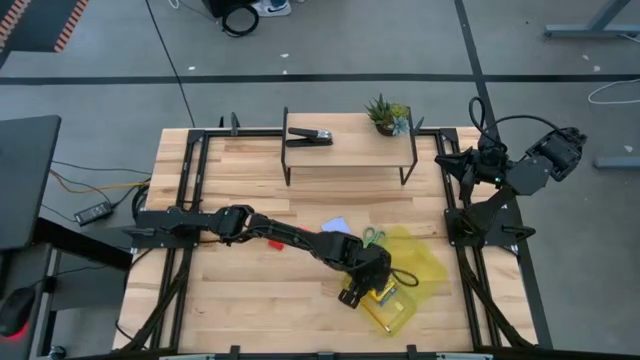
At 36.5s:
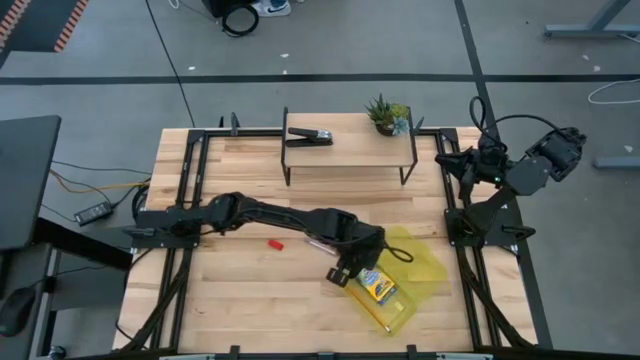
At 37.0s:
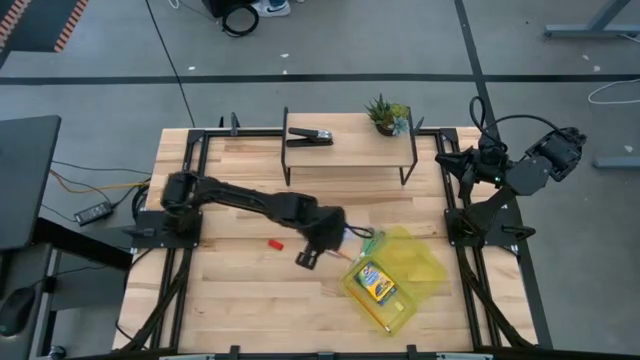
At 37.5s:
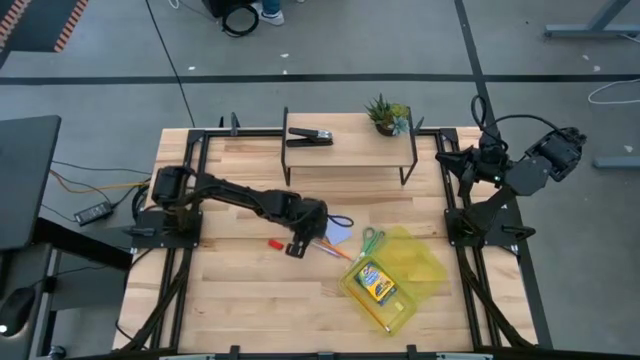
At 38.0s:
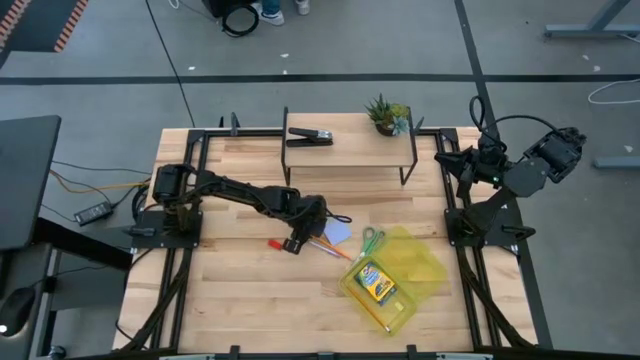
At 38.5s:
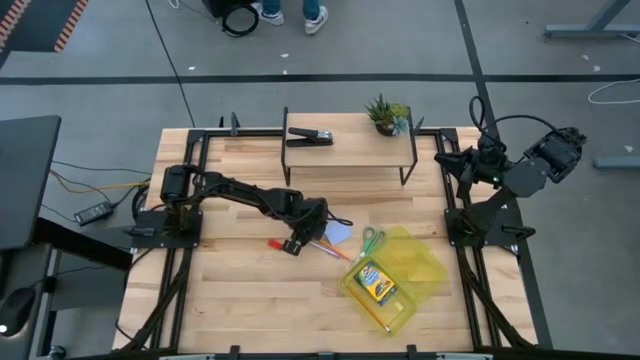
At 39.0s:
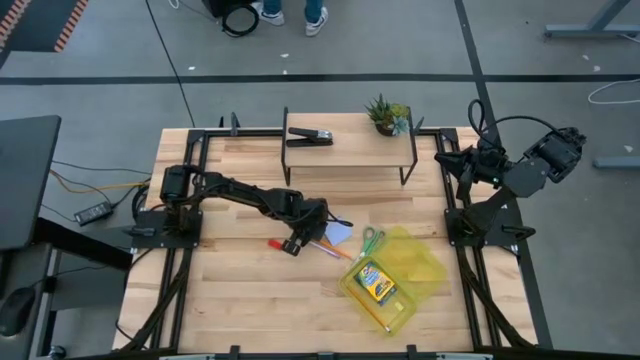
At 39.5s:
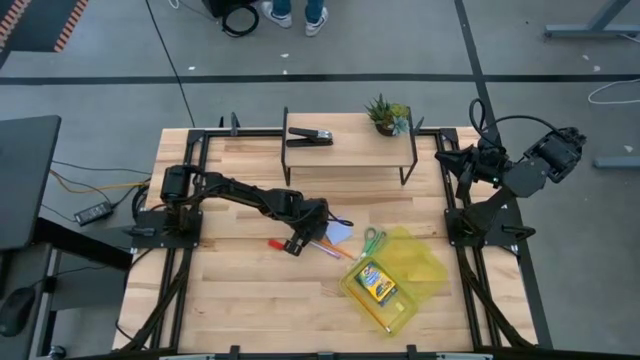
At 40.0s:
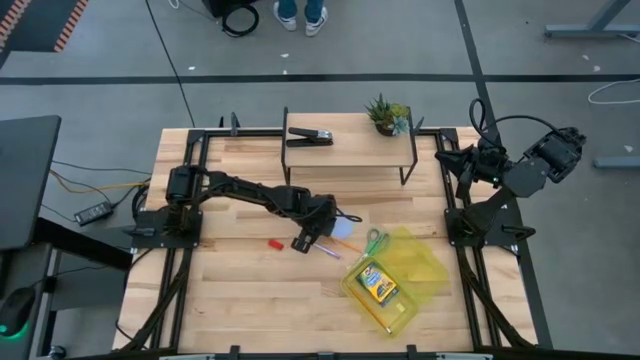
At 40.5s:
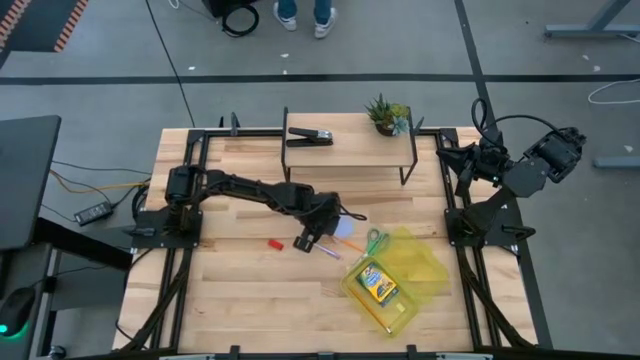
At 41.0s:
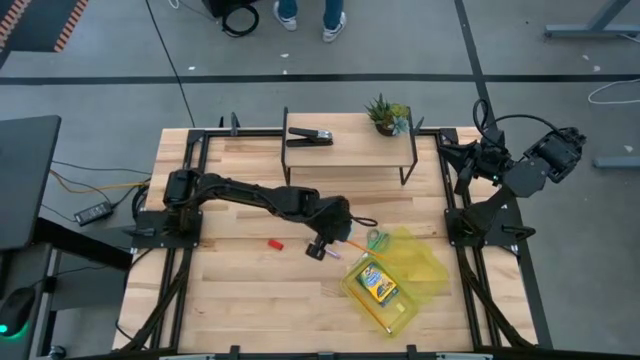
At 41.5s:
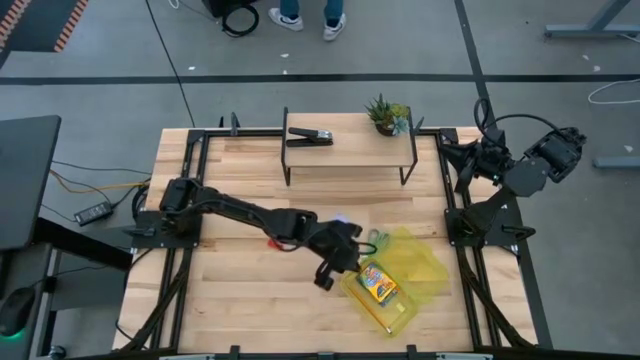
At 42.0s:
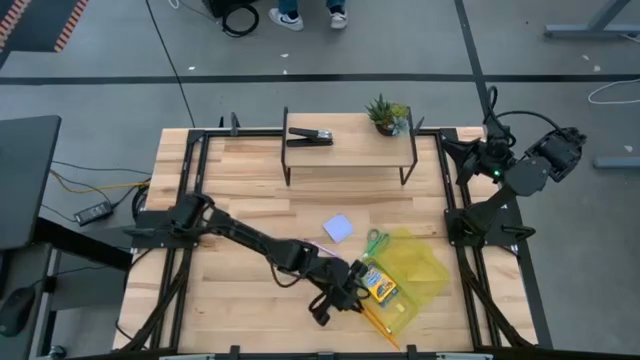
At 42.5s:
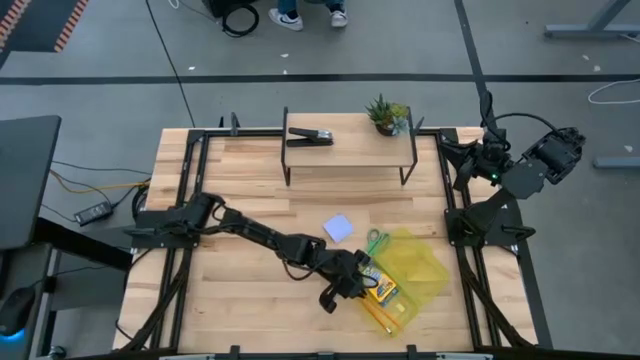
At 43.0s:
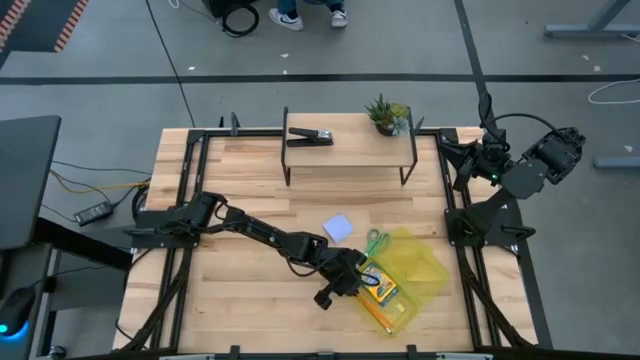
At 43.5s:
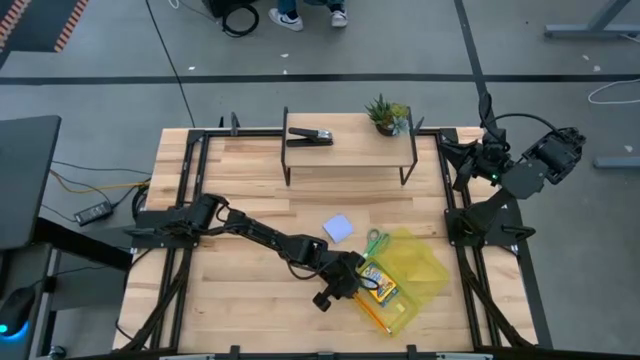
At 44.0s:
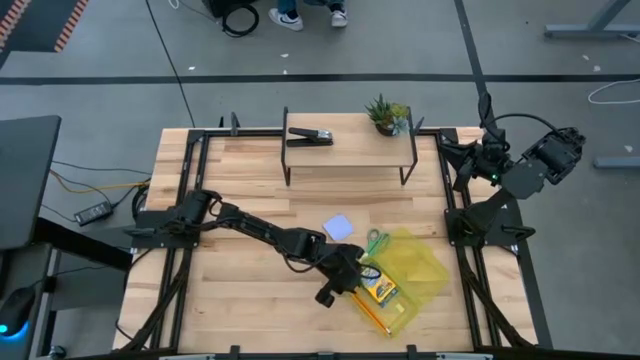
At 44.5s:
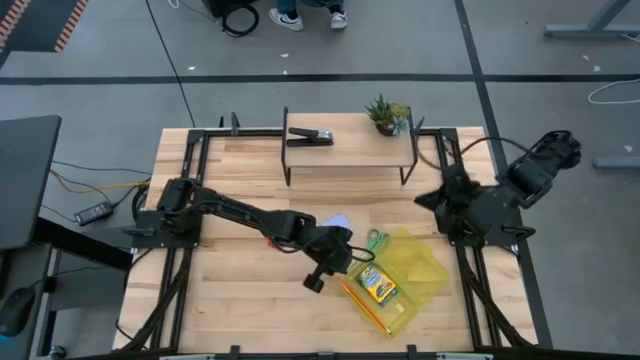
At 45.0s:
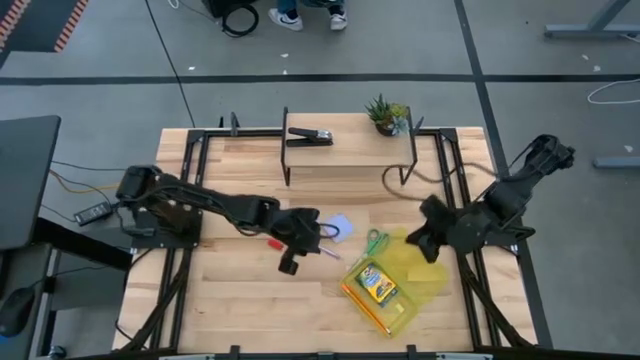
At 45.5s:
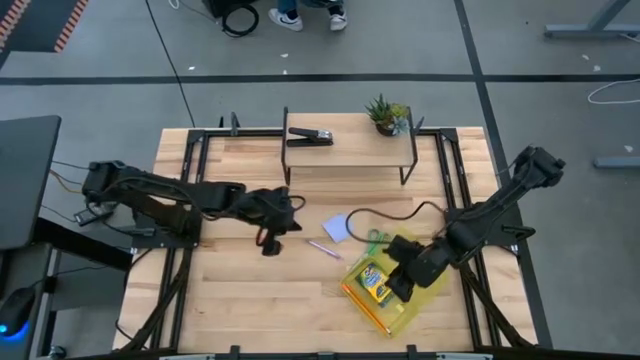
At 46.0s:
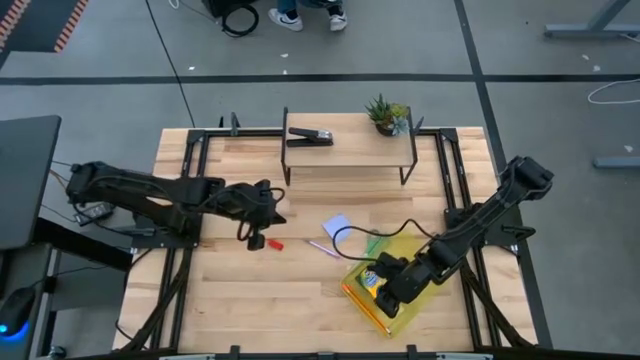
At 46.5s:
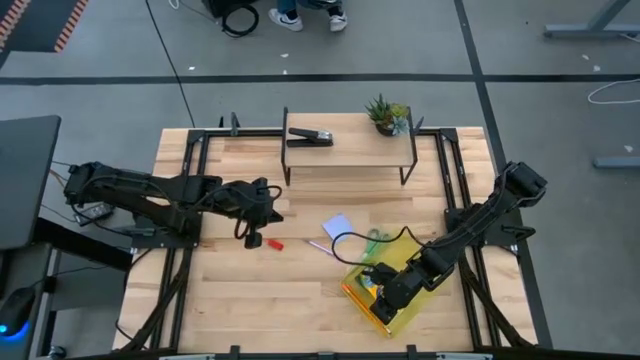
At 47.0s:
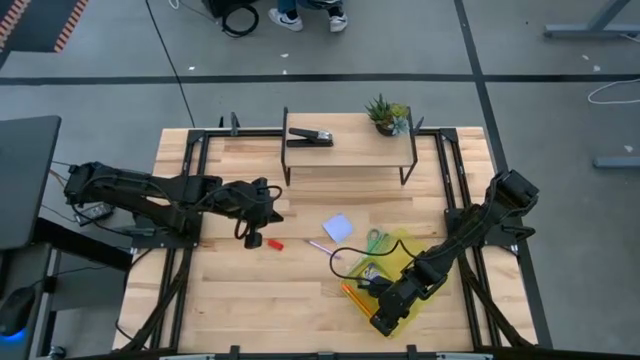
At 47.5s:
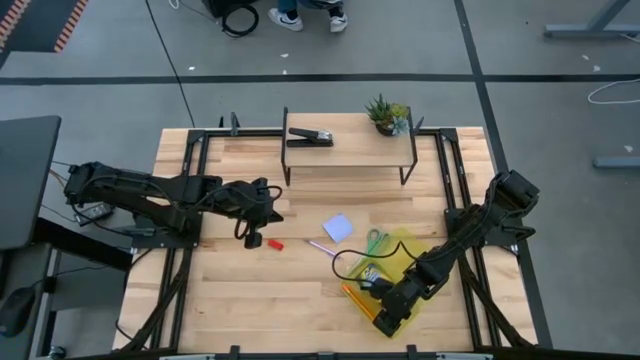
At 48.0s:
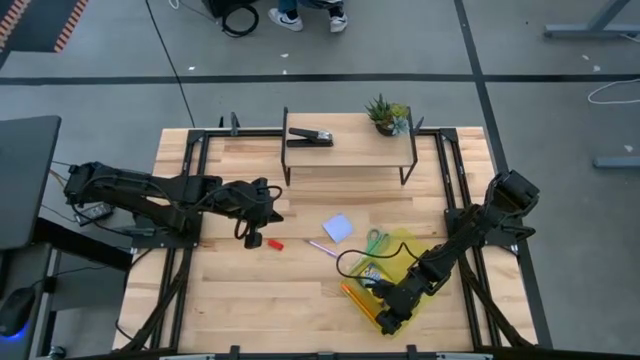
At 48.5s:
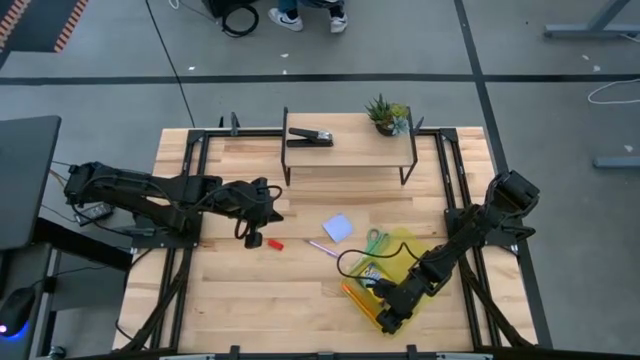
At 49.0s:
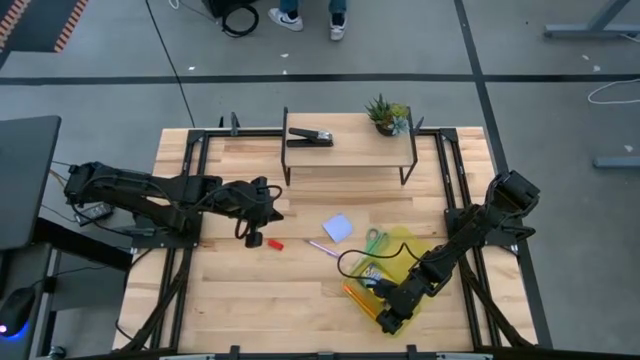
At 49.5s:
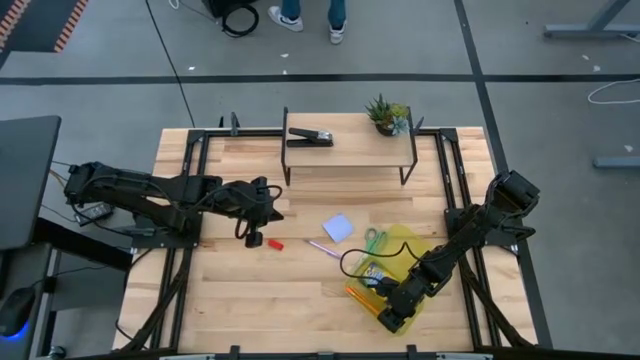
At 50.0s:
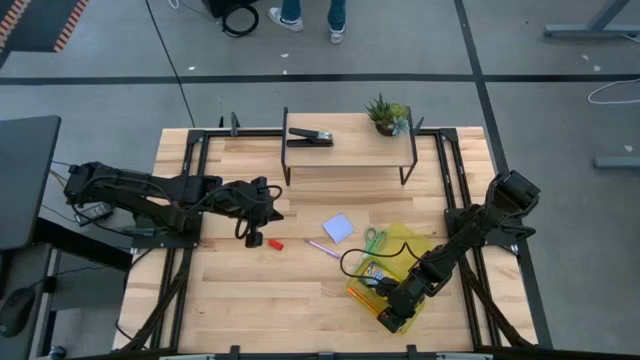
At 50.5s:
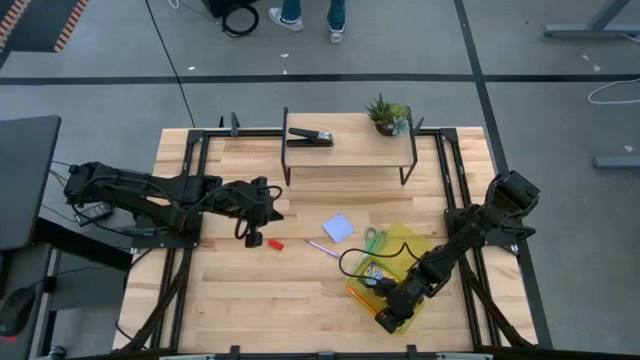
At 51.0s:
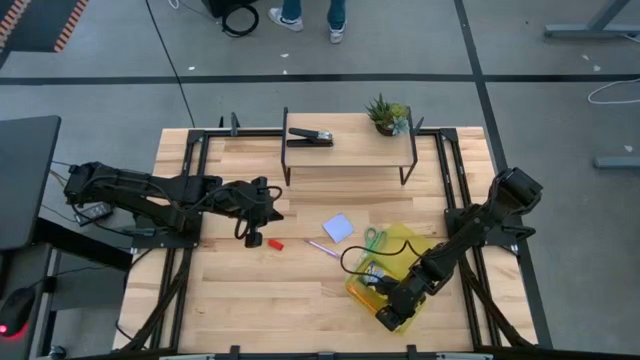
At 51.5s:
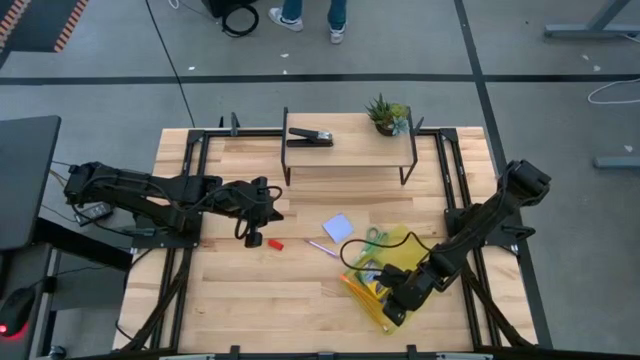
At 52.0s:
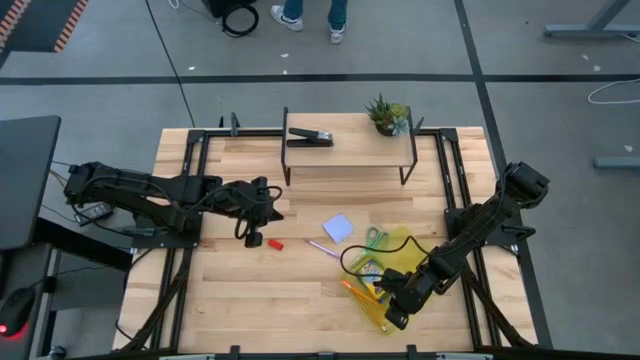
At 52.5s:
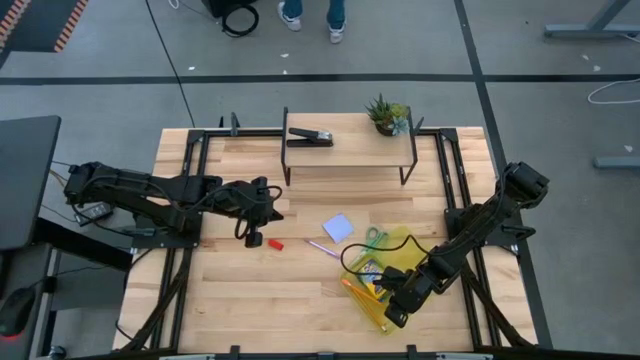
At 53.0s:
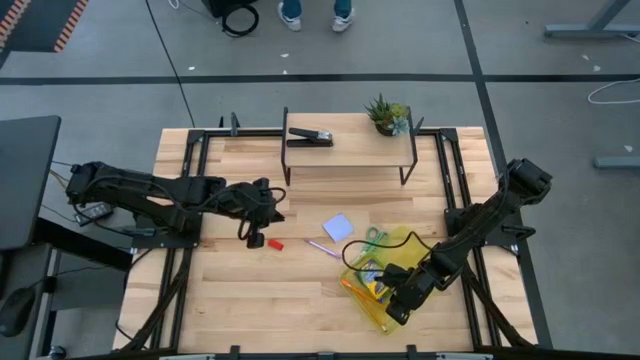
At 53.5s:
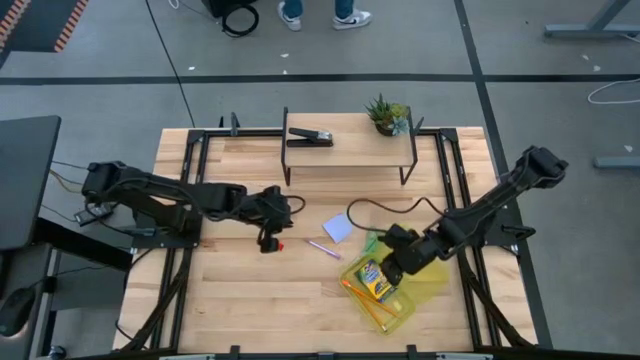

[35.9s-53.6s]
Task: Pack school essentials
Adjust the yellow crayon box

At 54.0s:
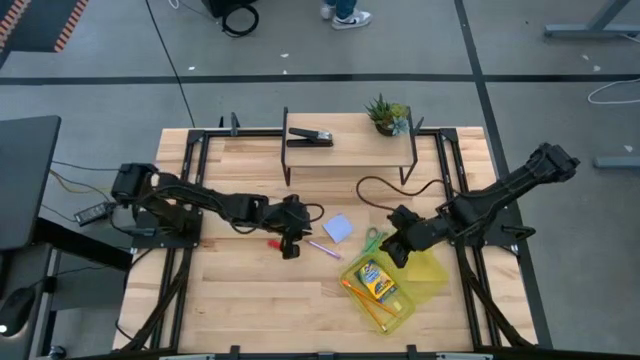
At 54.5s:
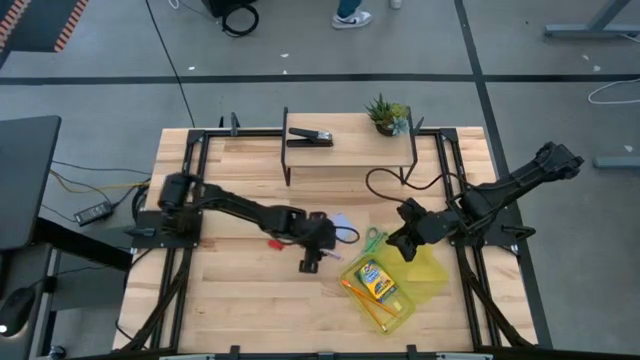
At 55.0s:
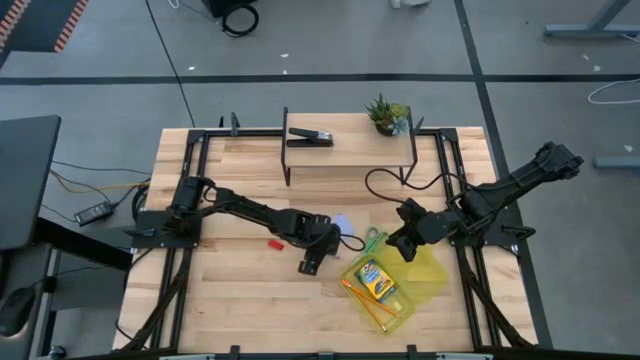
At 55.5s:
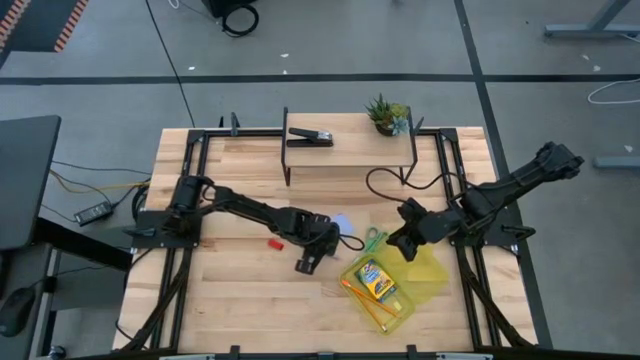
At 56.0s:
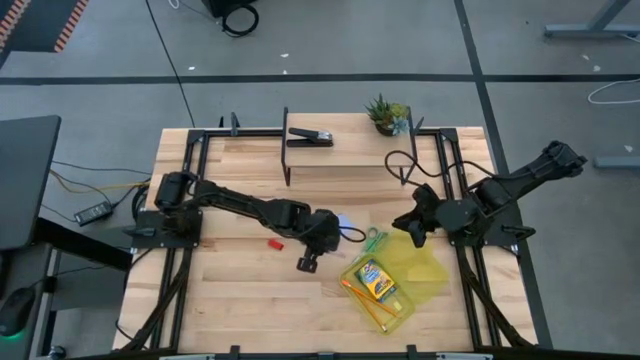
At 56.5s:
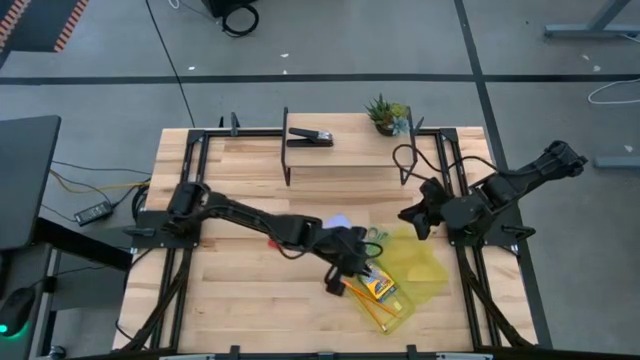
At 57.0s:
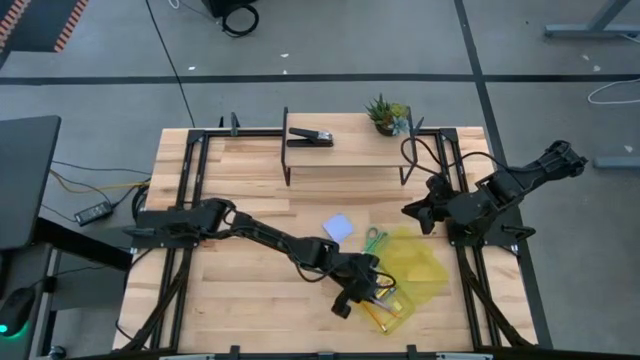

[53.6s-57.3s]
Put the violet pen into the yellow supply box

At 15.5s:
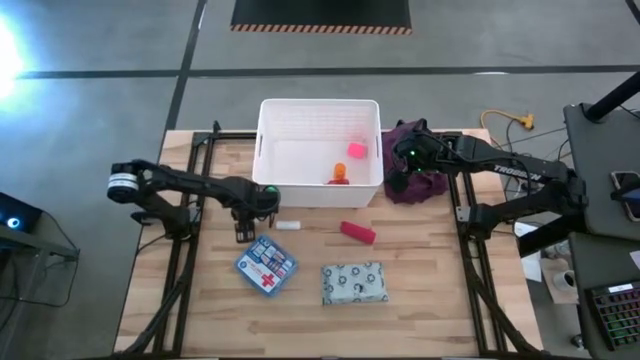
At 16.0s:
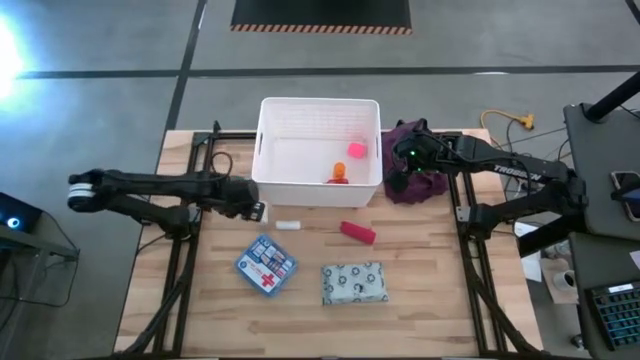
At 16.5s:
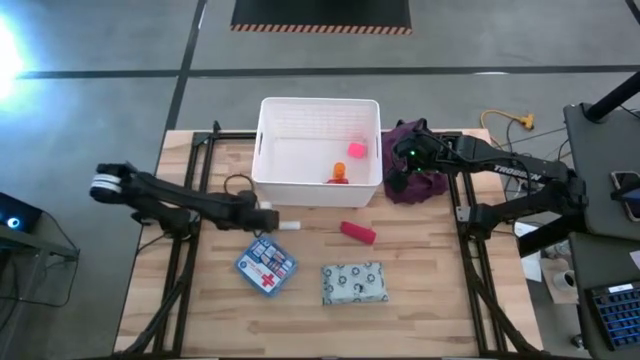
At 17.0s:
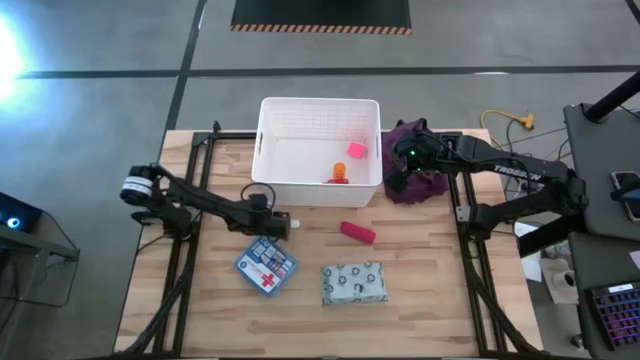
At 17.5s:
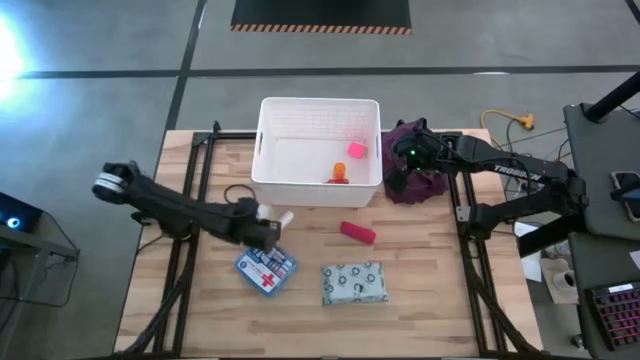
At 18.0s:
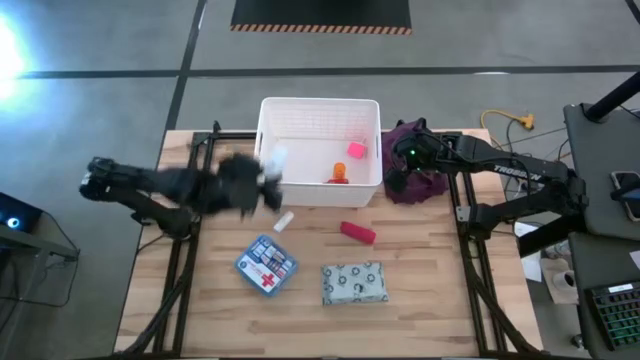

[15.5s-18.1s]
Task: Pick & place medical supplies in basket/bin
Put the white pill bottle into the white bin
